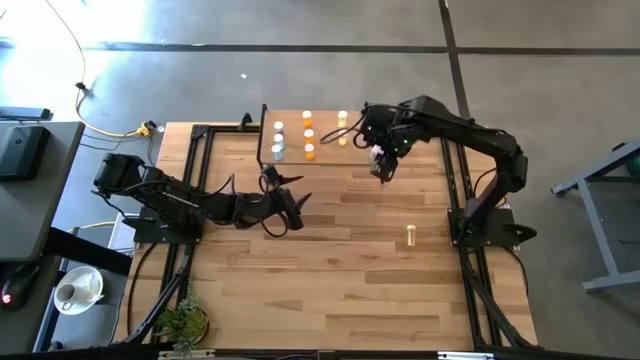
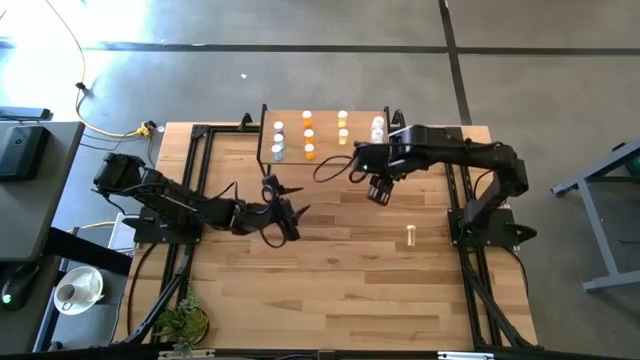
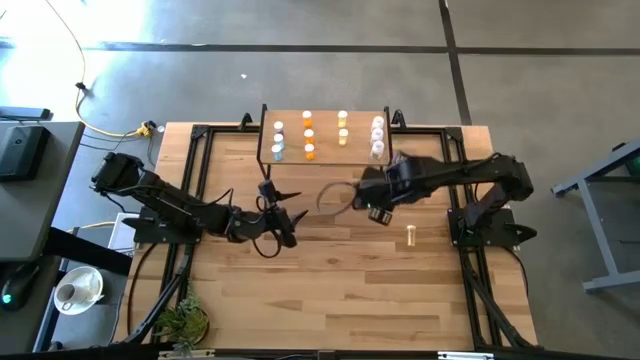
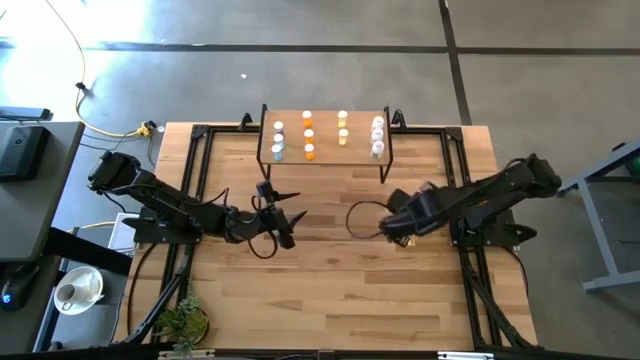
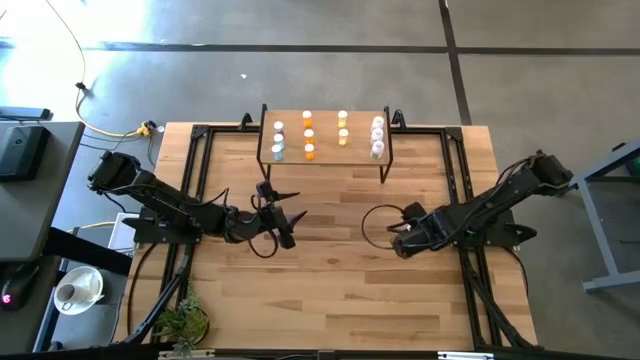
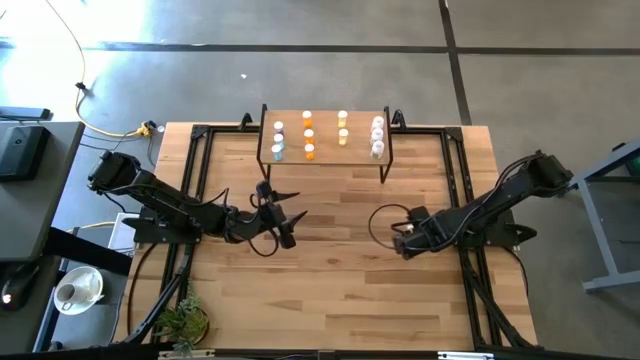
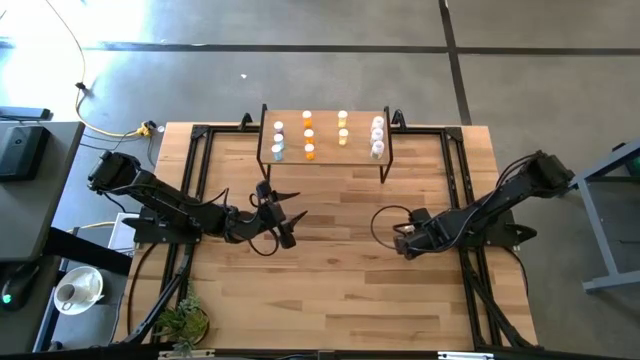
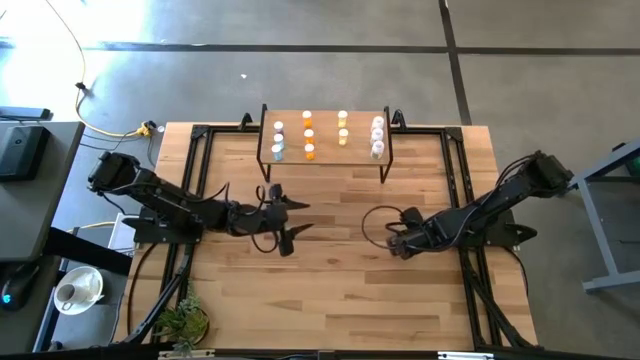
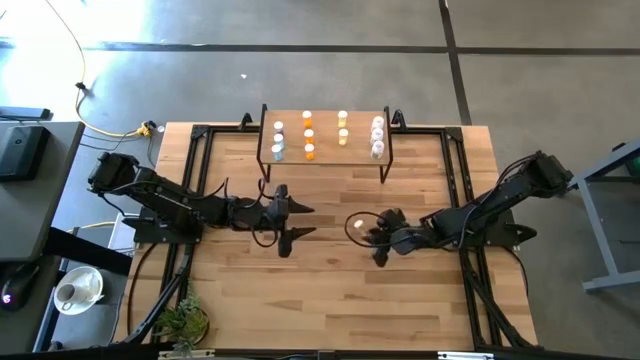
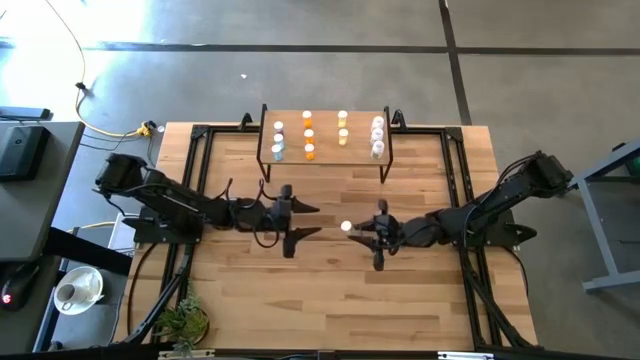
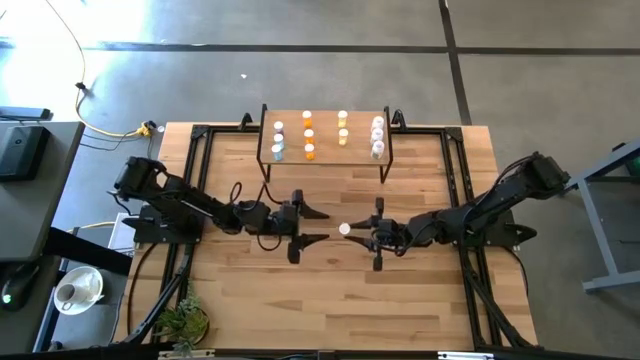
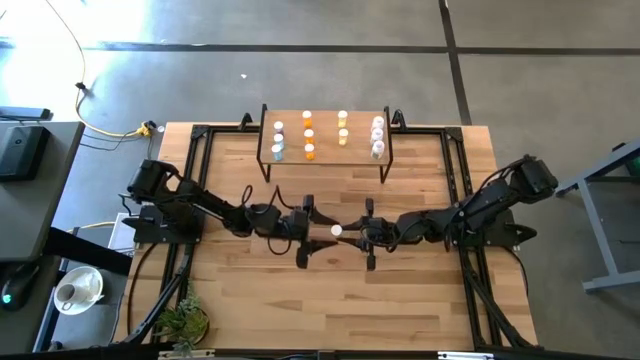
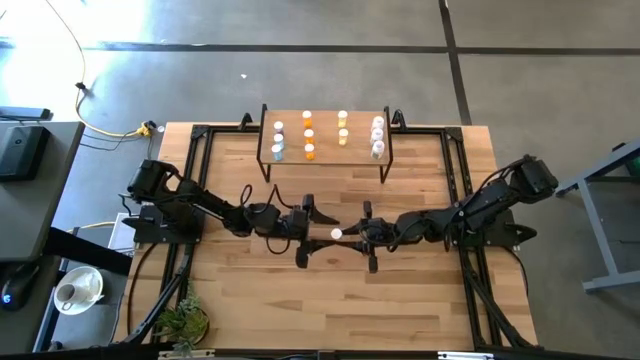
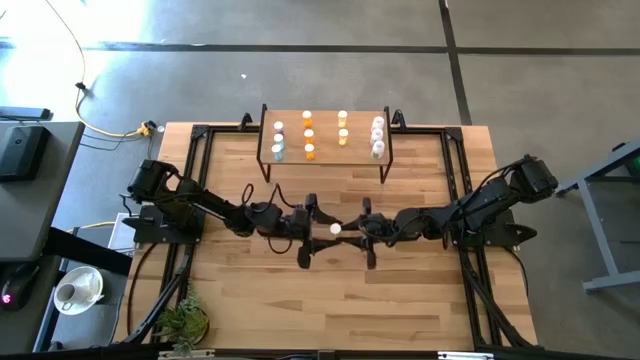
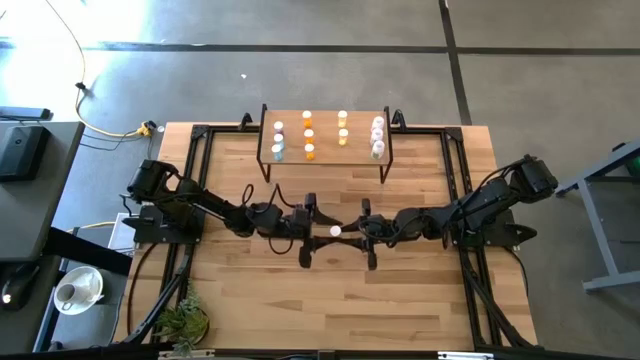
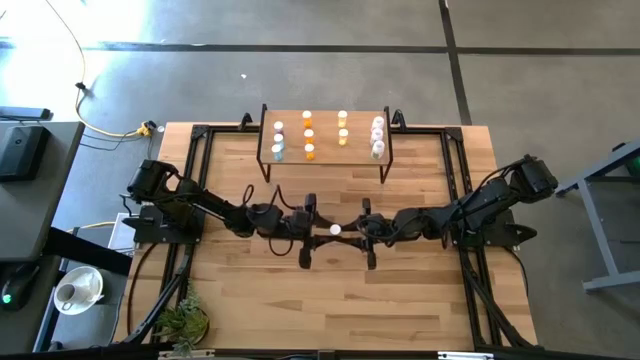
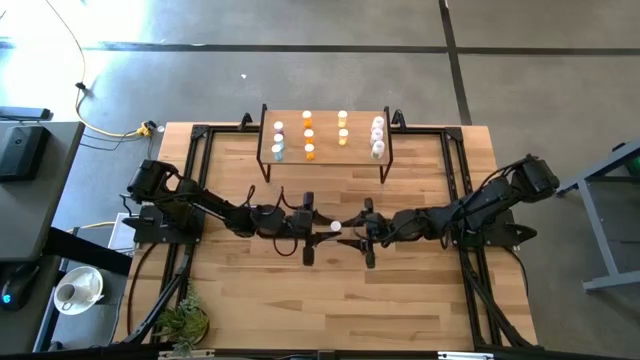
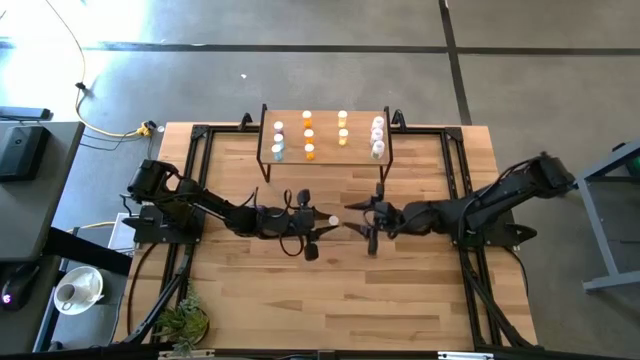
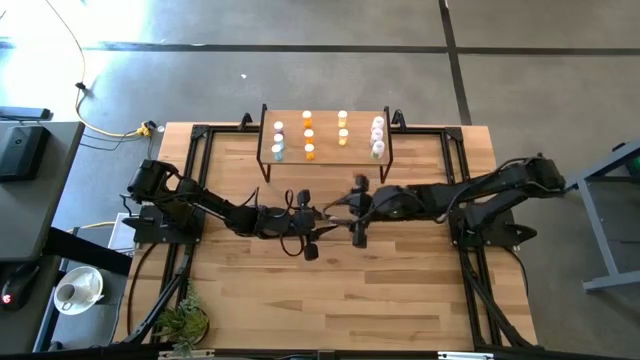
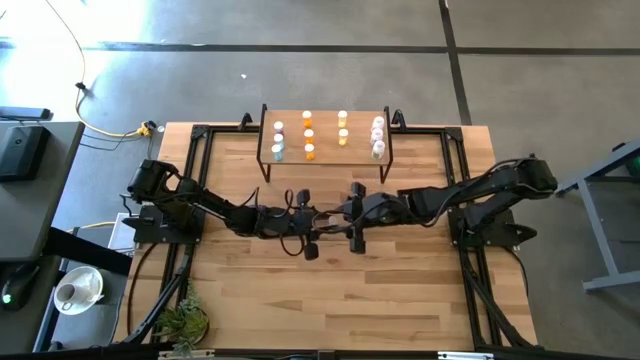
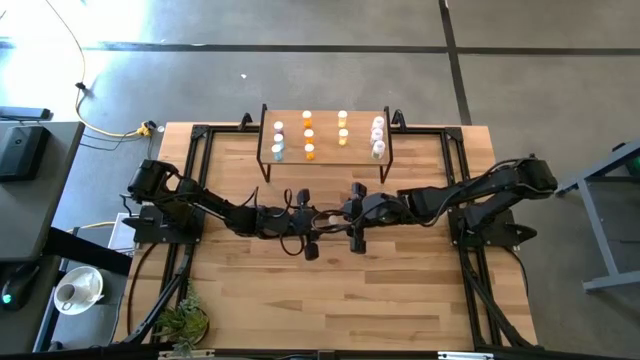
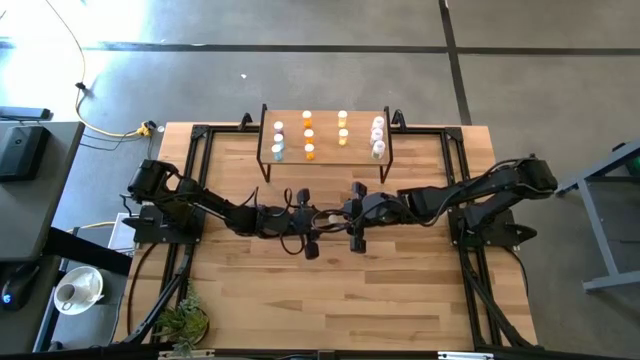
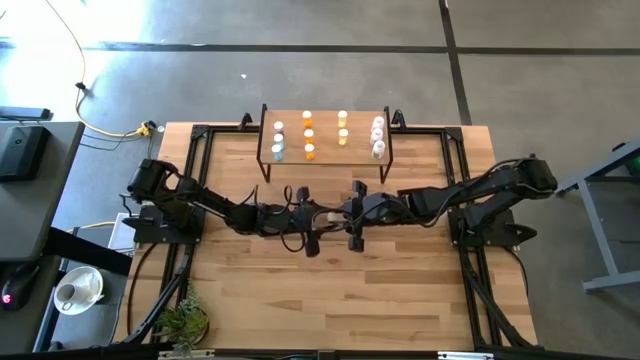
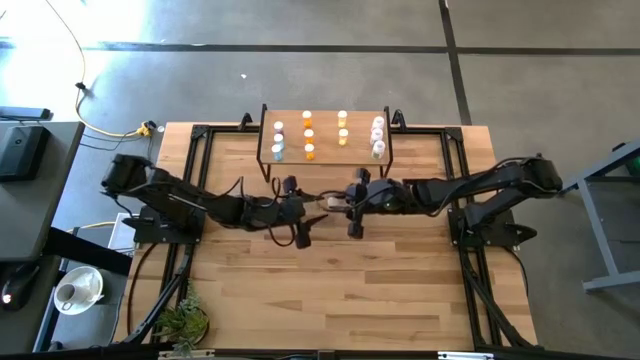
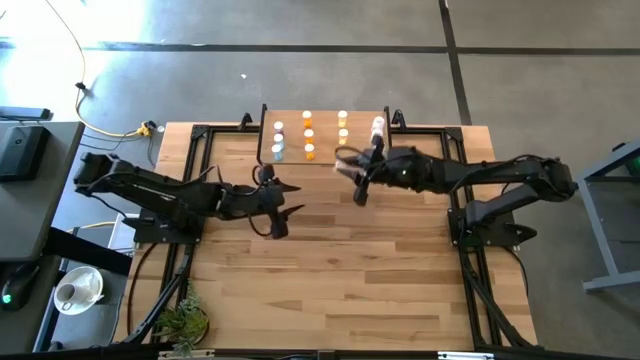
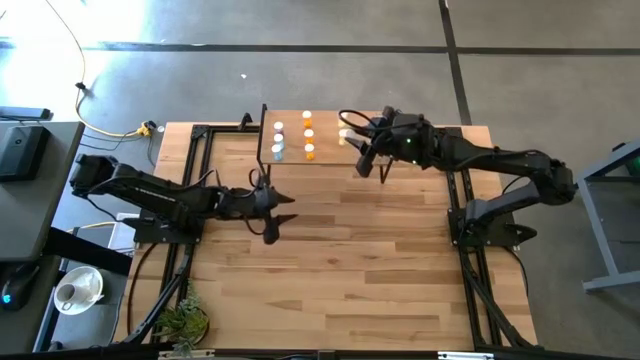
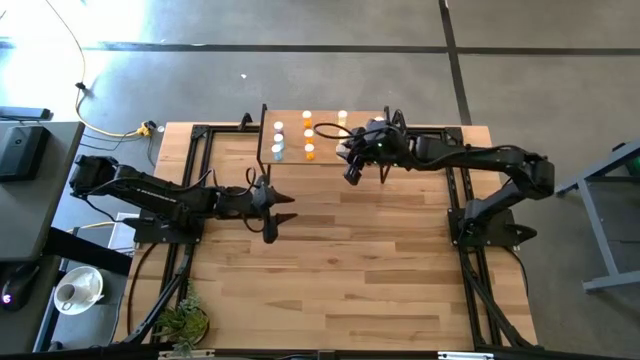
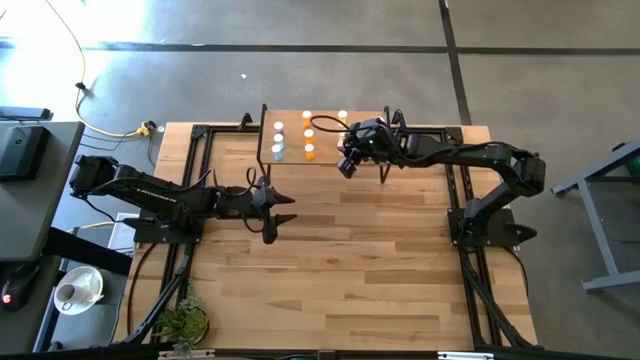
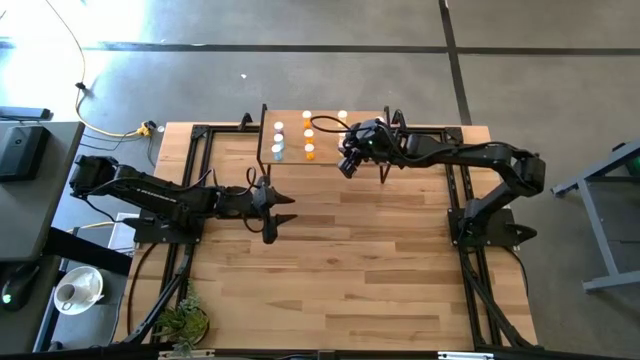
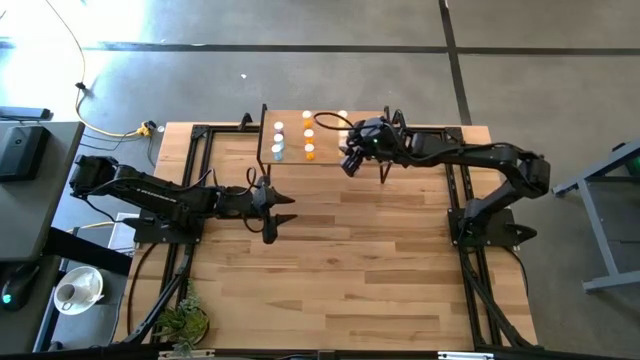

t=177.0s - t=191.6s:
Task: Pick and place medicine bottles onto shelf by color
Put the yellow pill bottle on the shelf aligned with the other yellow pill bottle

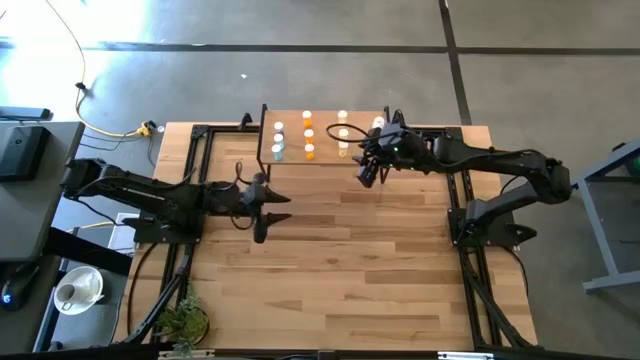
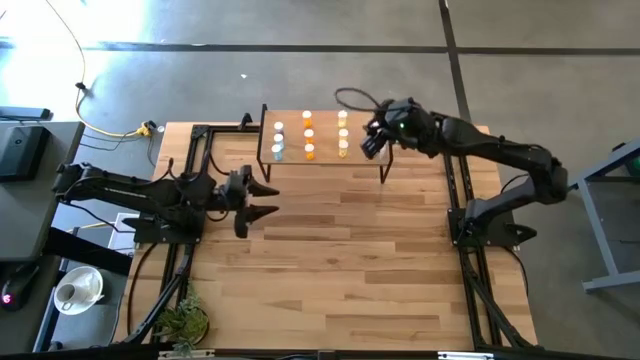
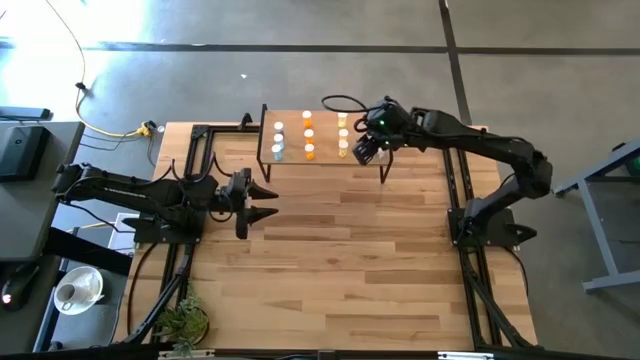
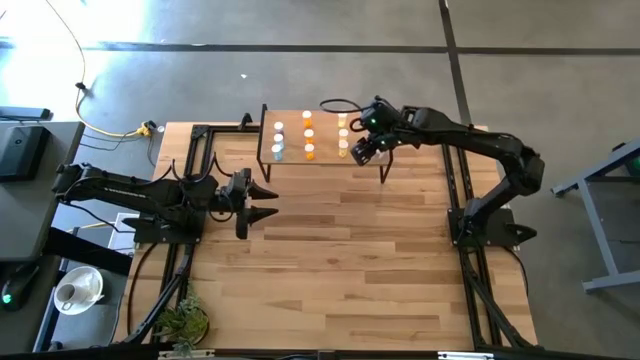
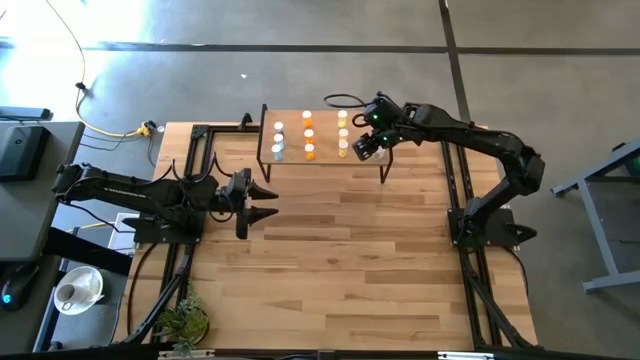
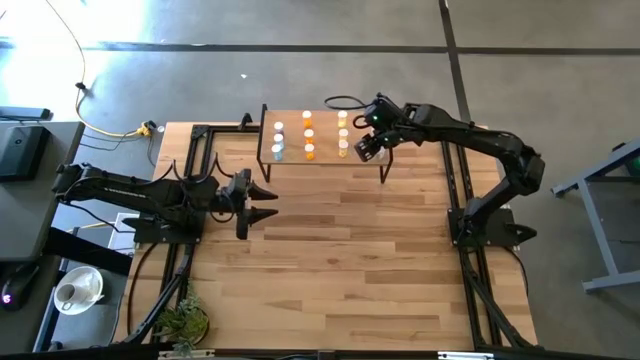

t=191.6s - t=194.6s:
Adjust the white pill bottle on the shelf

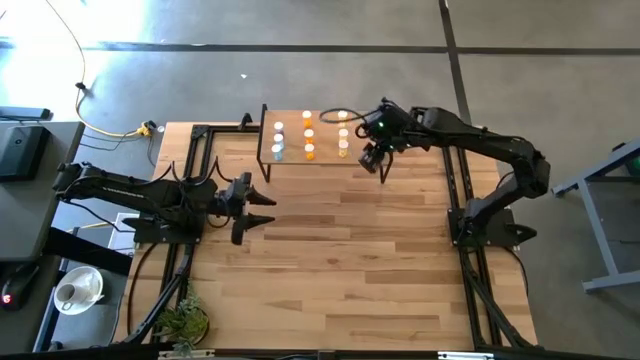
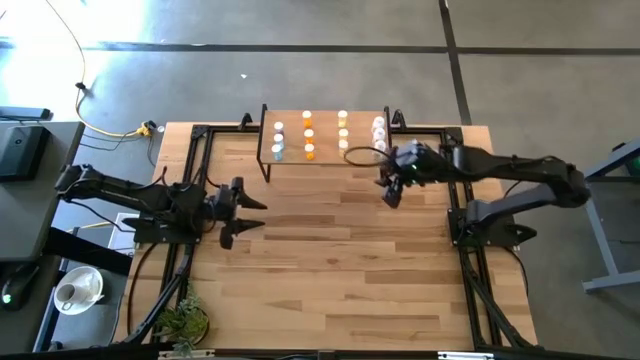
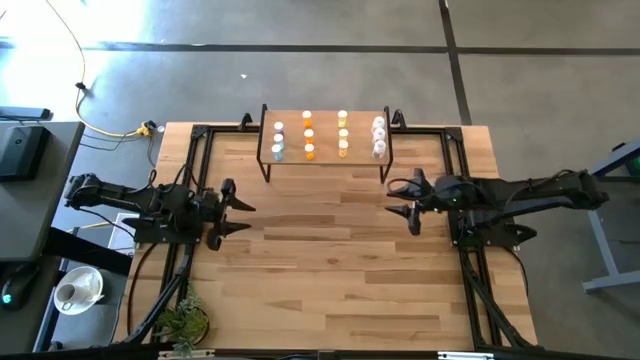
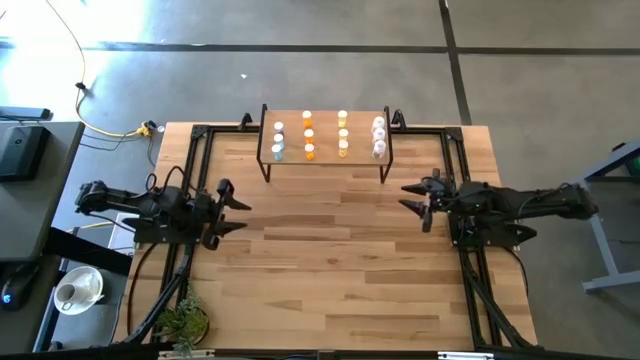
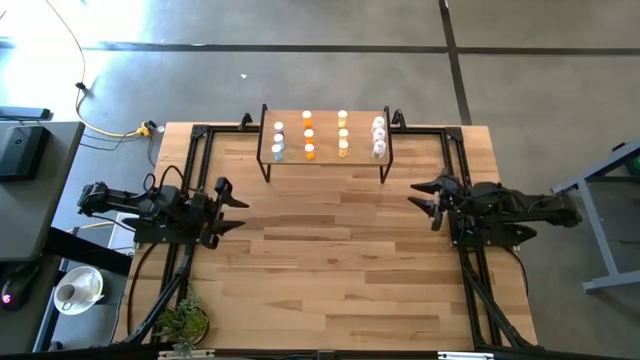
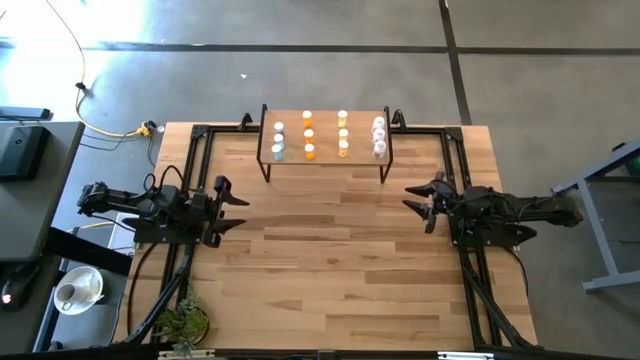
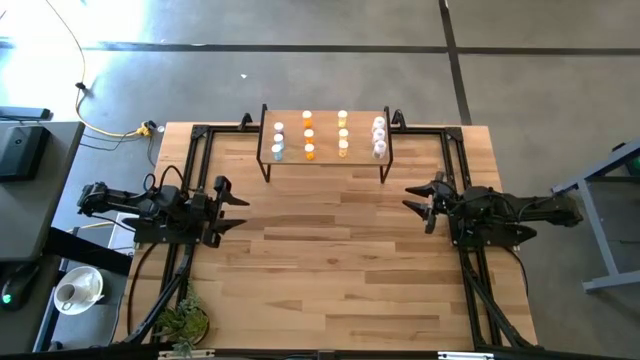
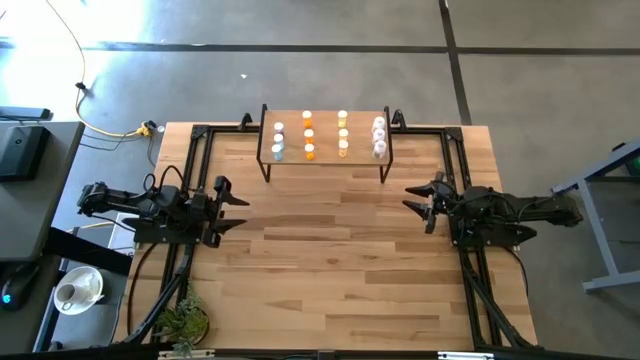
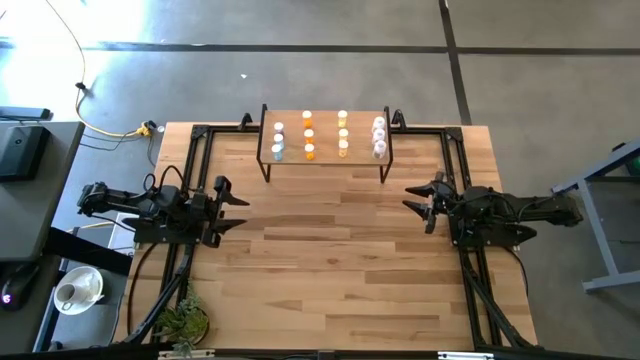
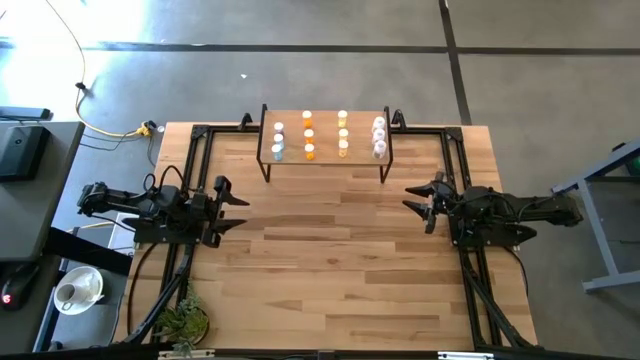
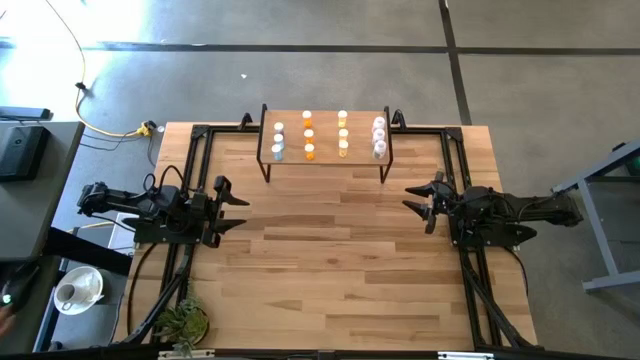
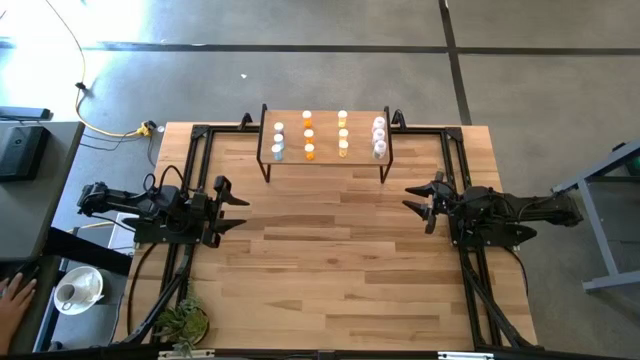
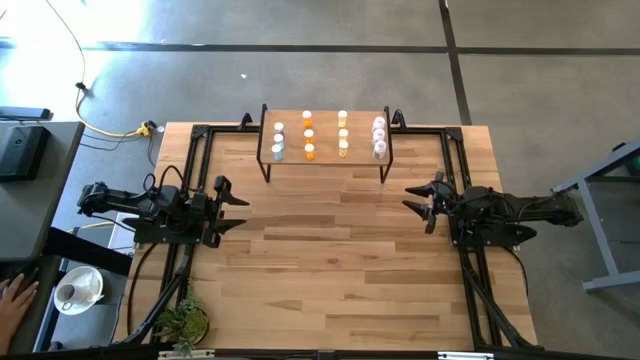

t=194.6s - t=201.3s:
Return to Home Position
